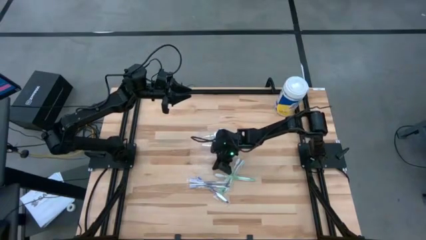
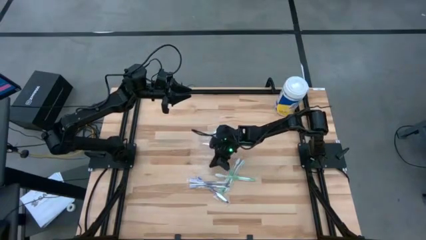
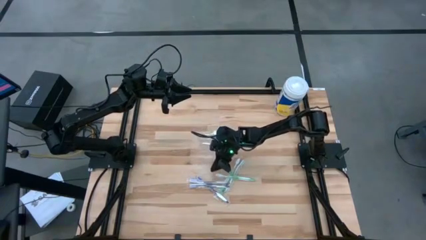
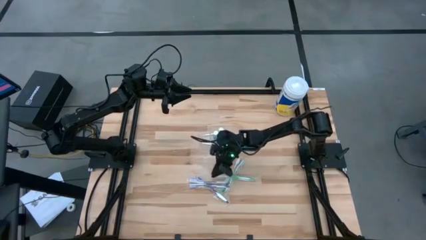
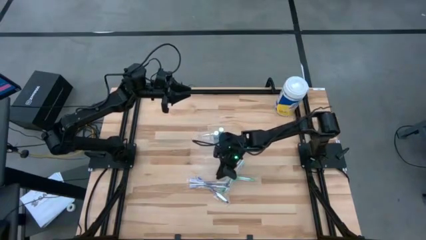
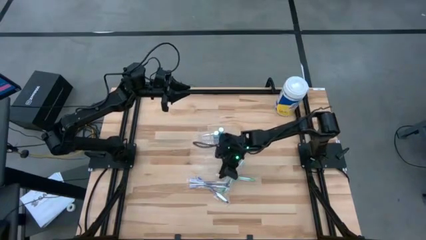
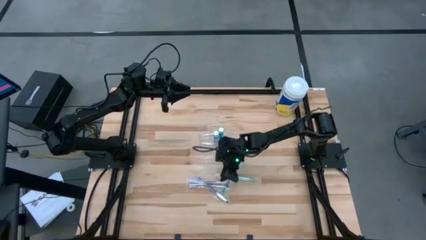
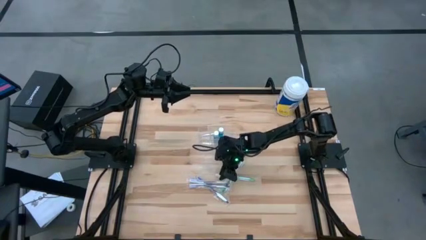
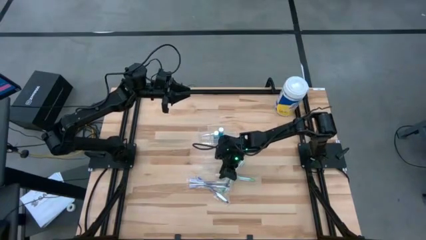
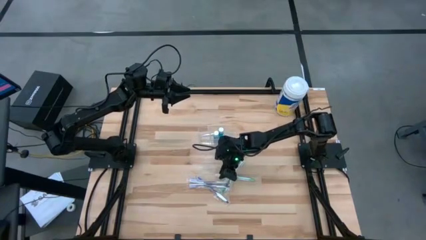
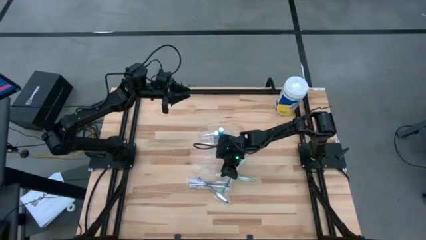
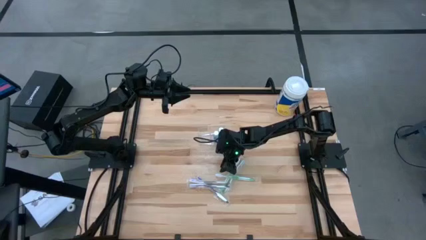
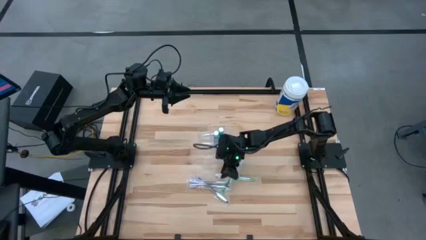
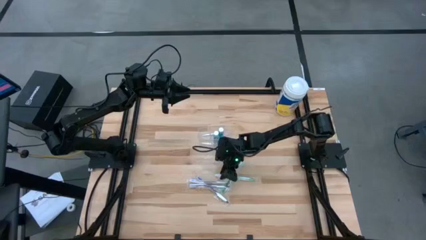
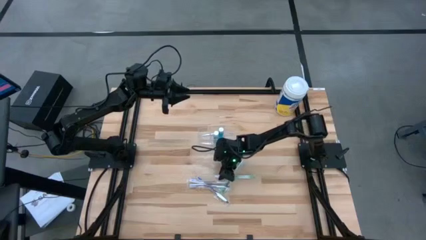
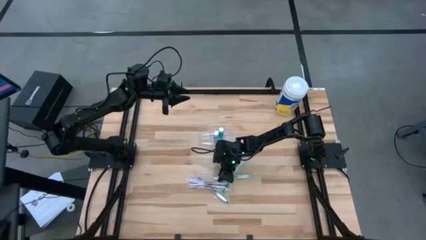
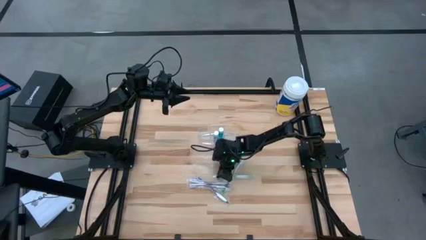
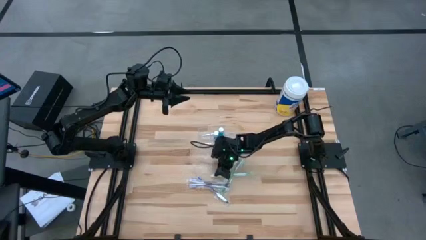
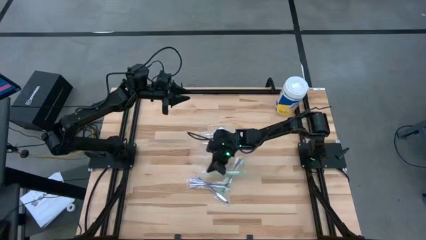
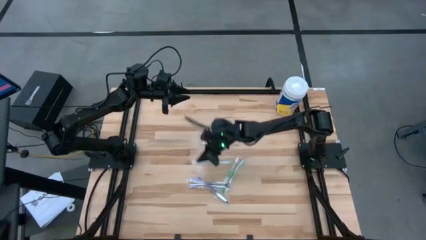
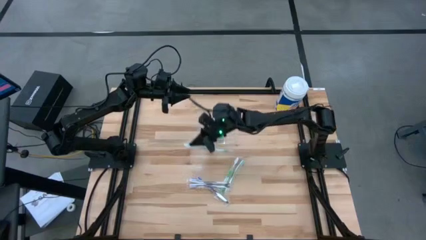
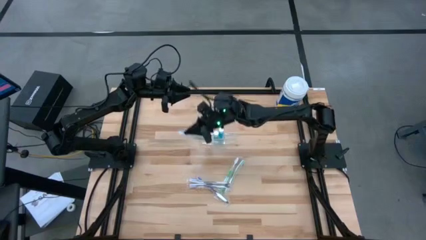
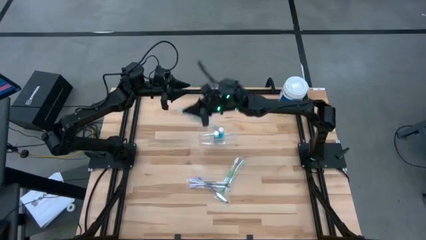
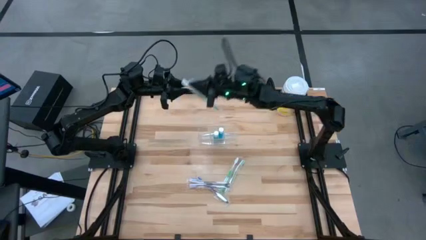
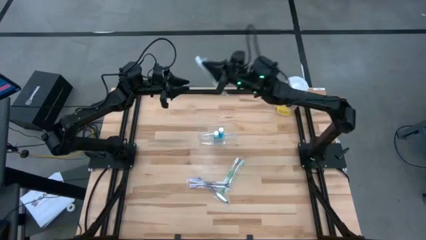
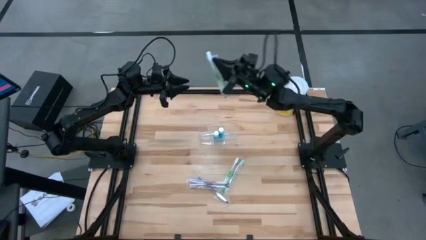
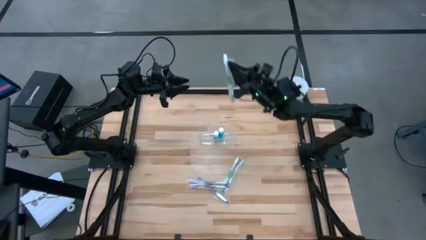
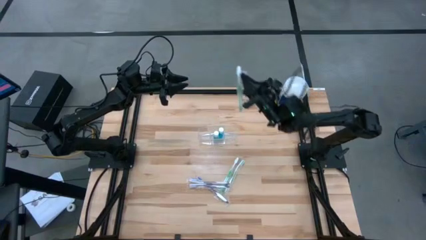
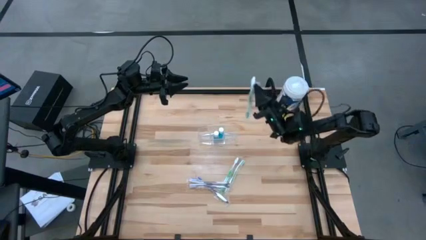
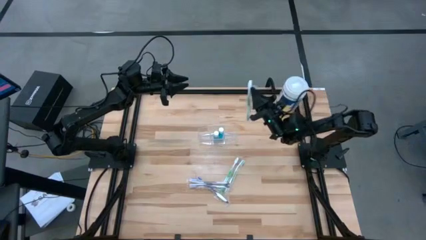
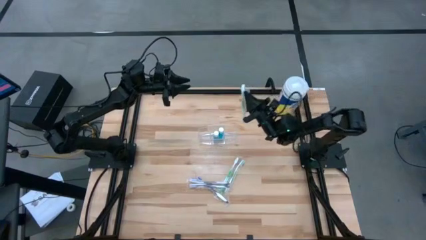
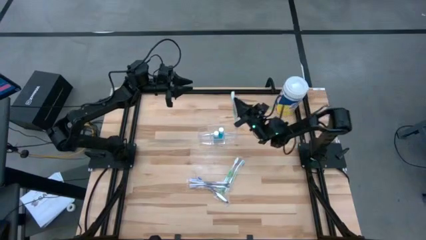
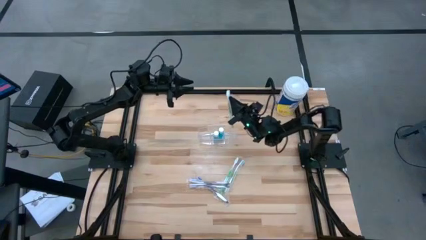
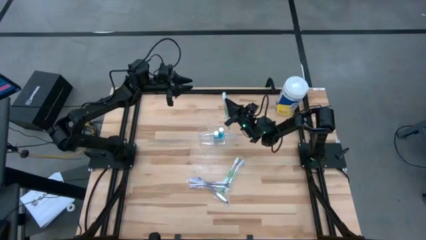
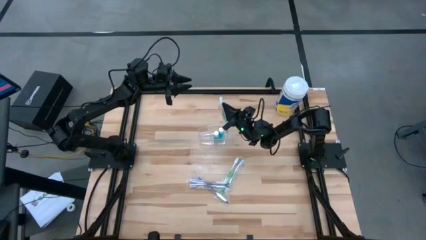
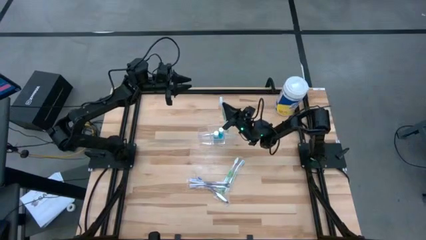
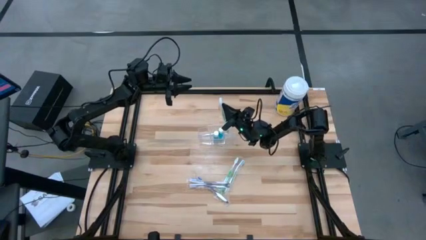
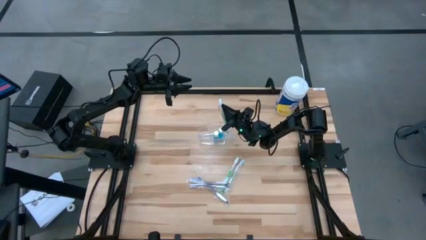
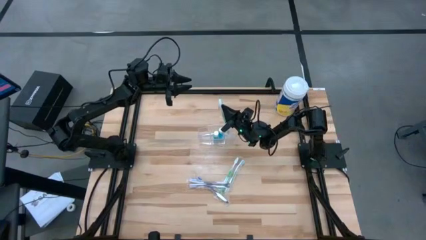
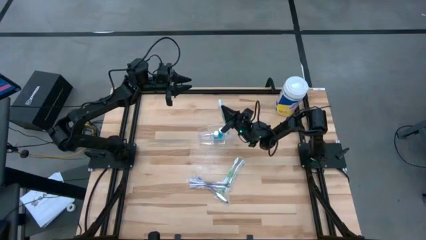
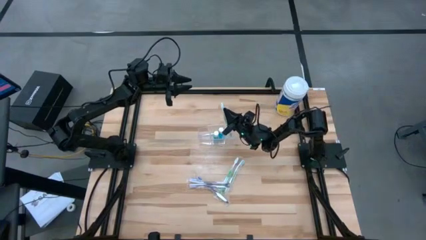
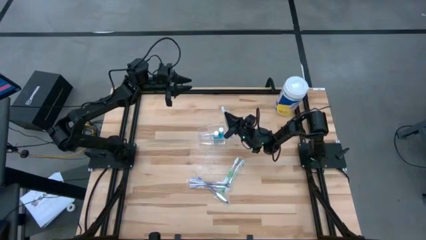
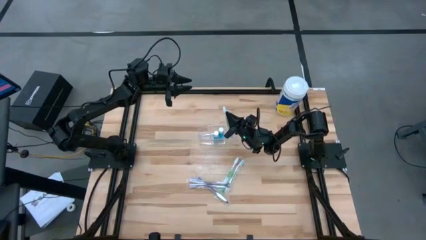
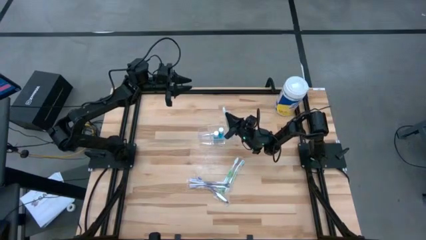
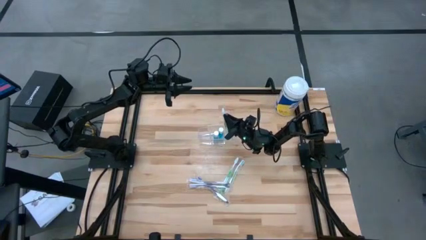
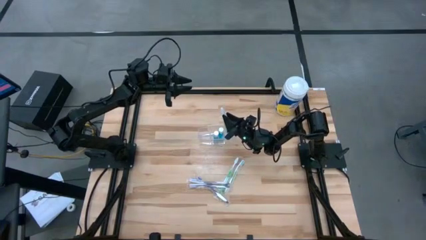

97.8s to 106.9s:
Task: Pick & Place toothbrushing station
Put the bottom green toothbrush into the transparent organizer

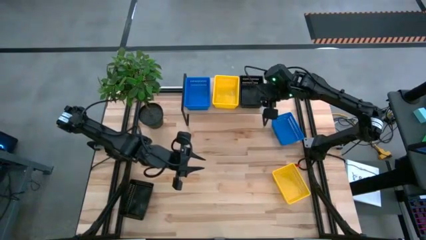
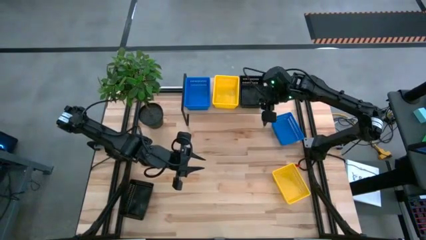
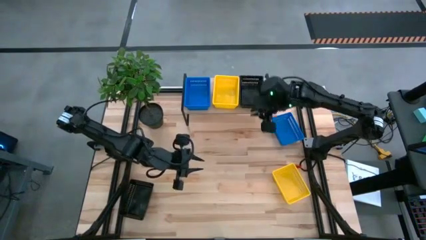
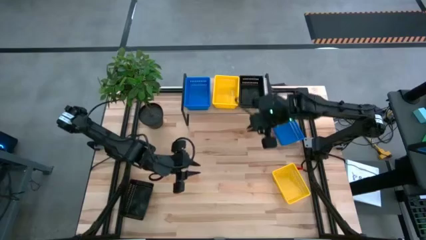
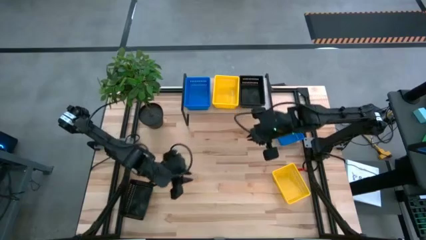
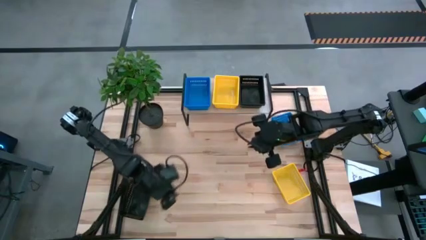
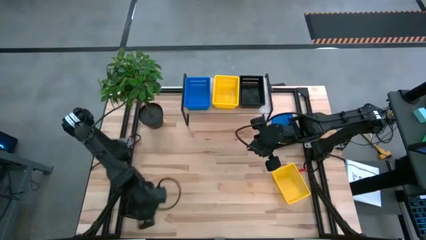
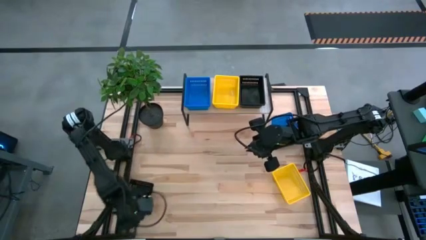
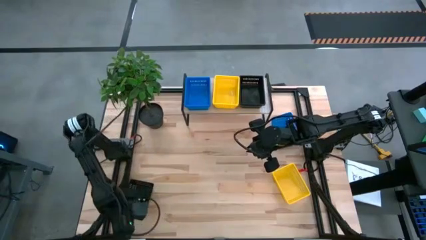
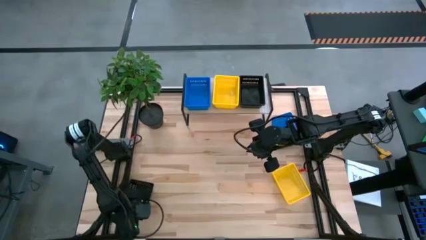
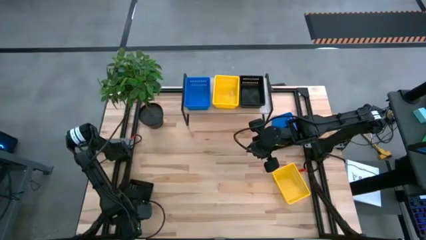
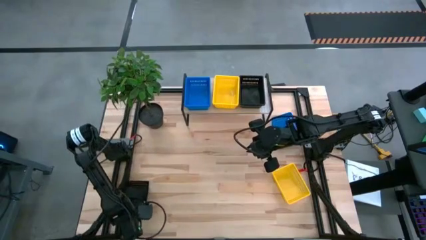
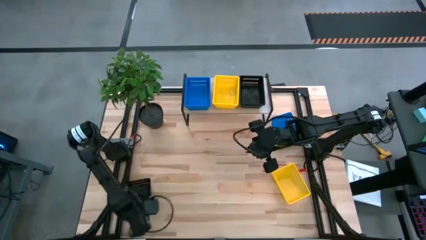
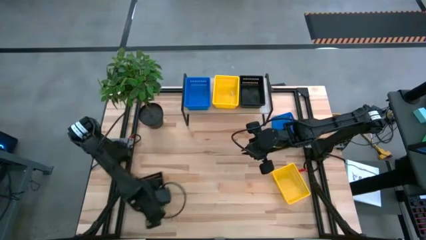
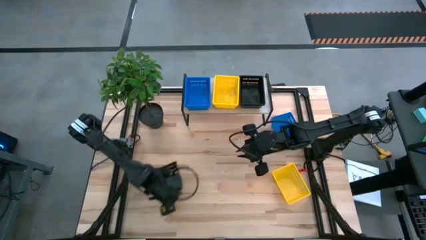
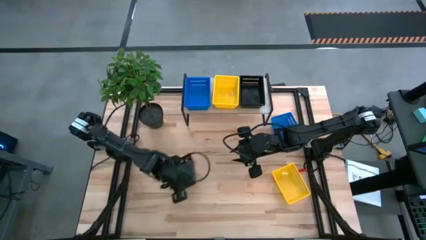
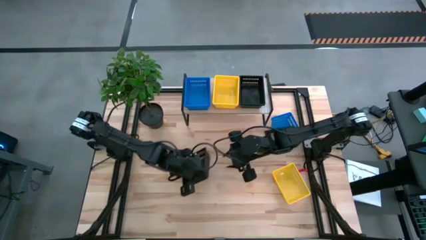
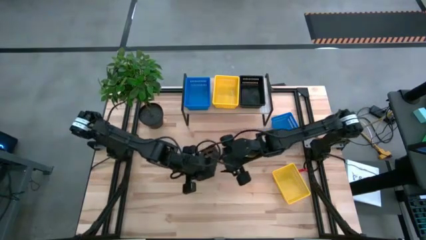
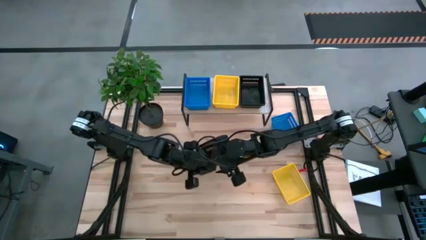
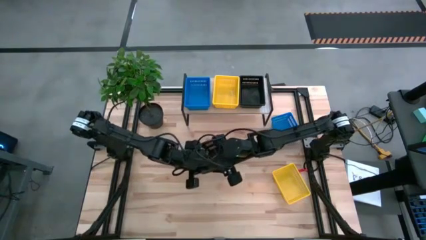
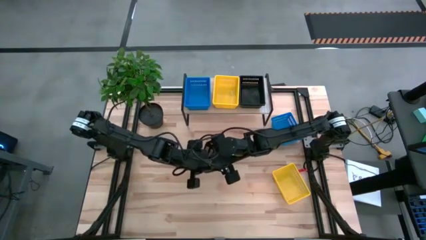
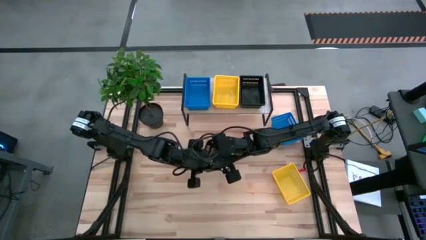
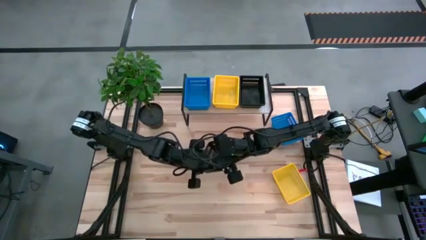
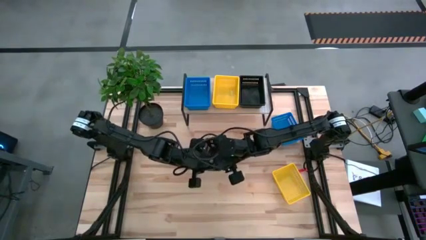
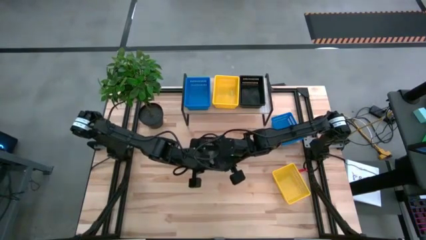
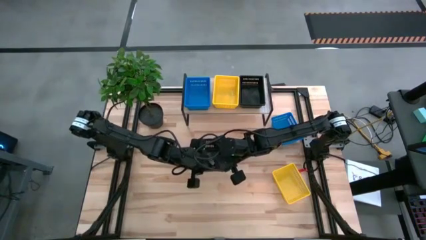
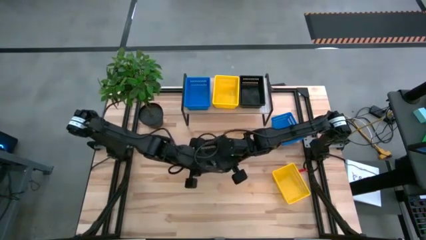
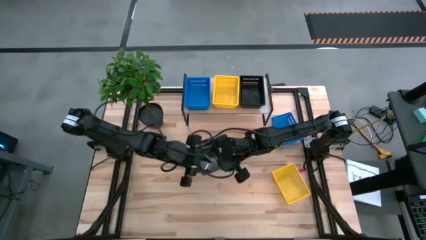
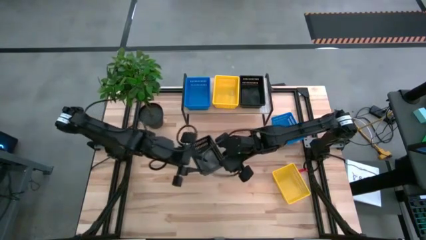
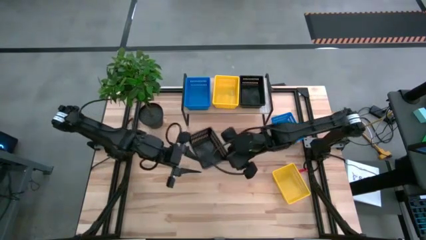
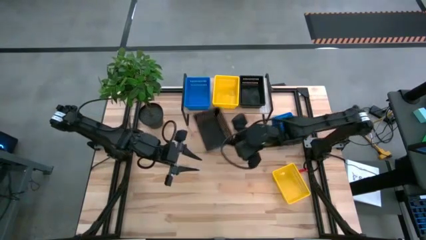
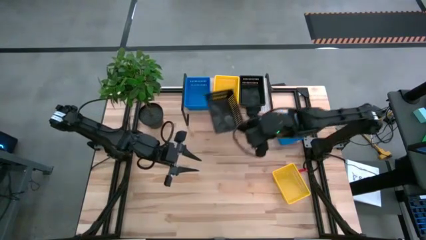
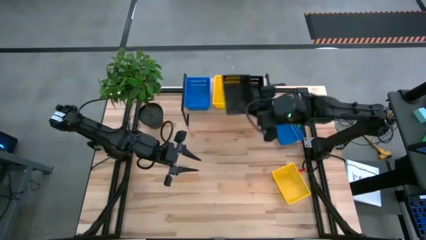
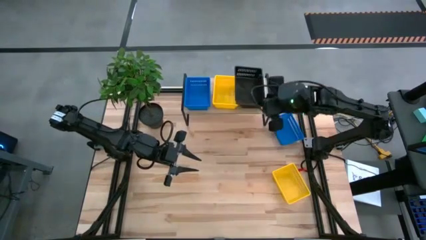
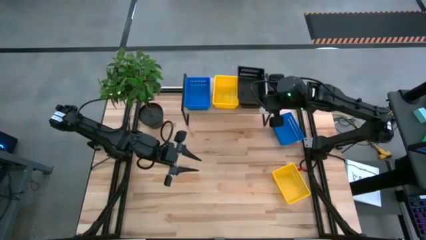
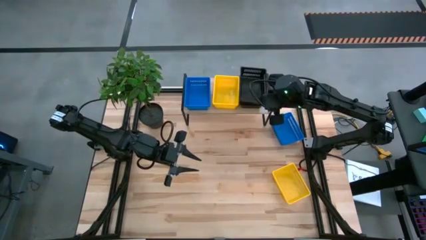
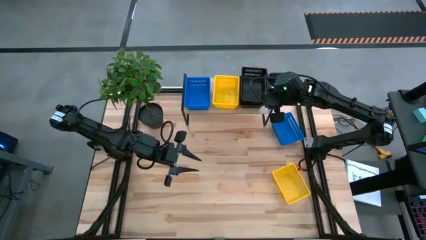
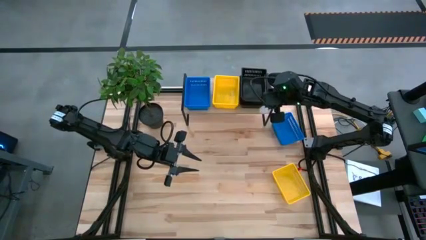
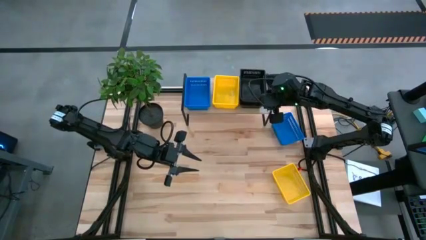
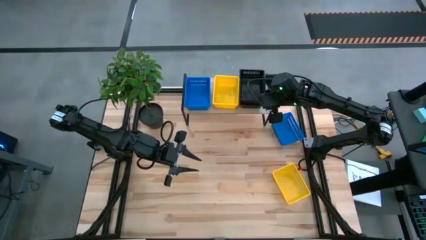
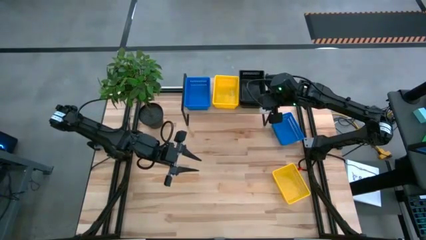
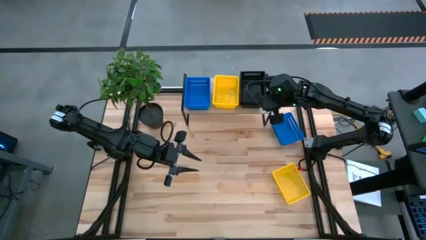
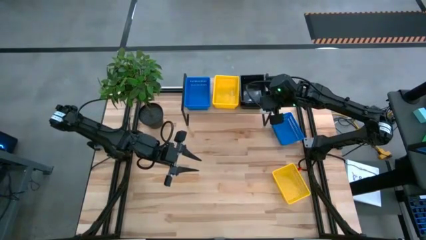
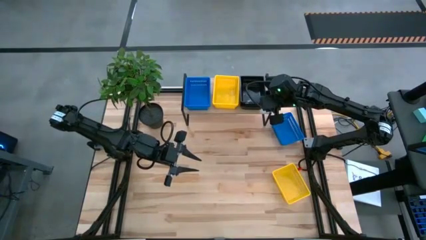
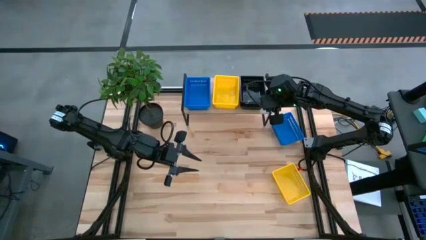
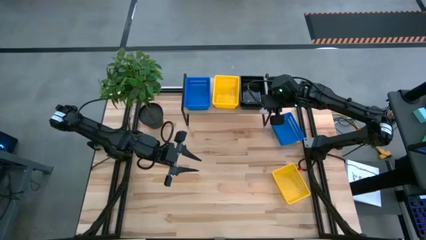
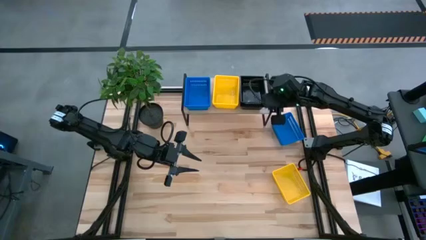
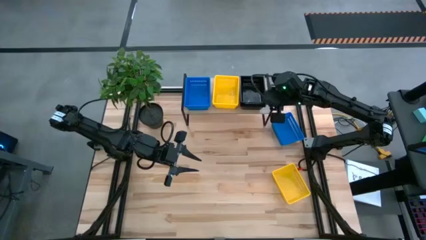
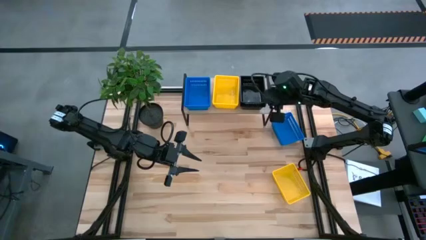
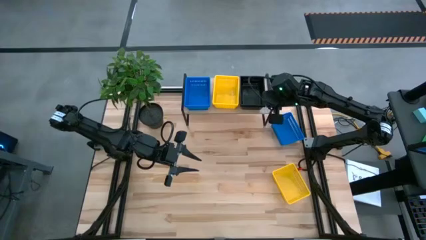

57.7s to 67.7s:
Task: Stack baskets on shelf by color
Stack the black bin on top of the other black bin on the shelf
